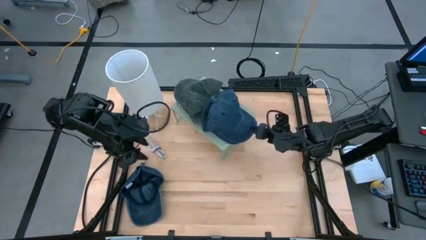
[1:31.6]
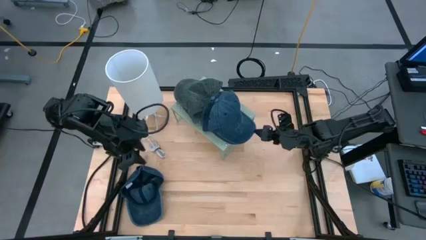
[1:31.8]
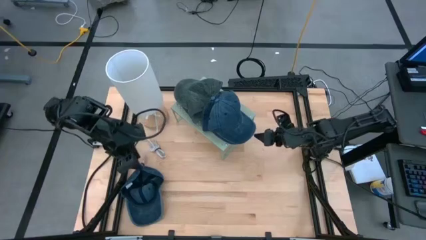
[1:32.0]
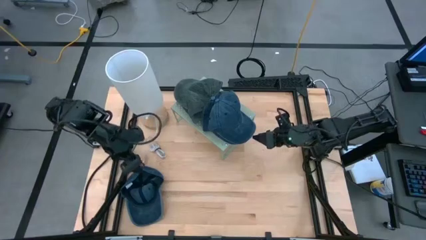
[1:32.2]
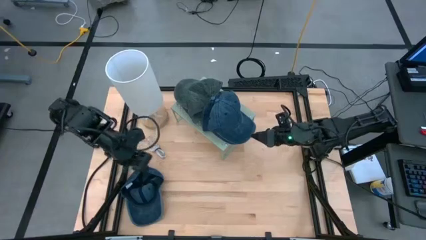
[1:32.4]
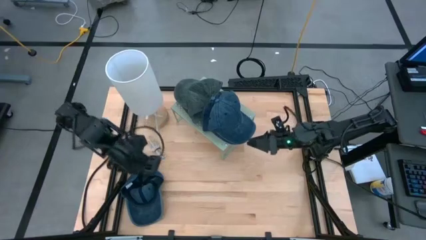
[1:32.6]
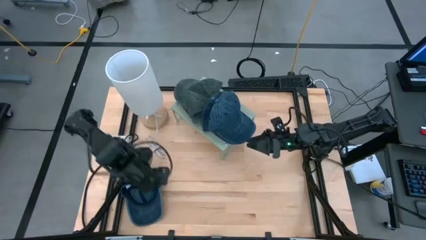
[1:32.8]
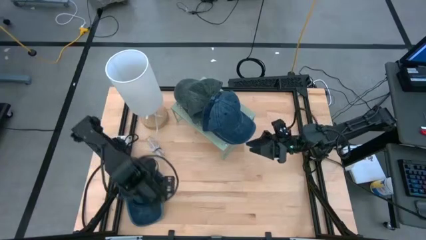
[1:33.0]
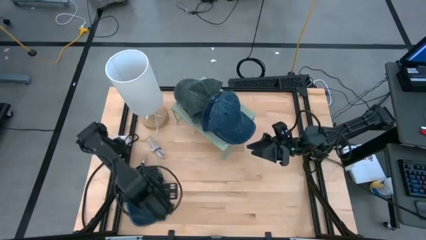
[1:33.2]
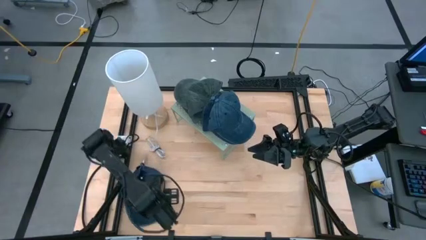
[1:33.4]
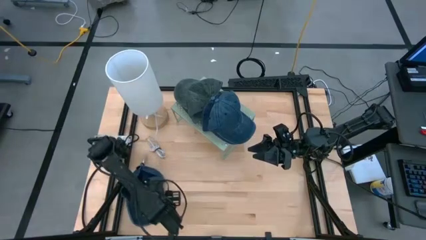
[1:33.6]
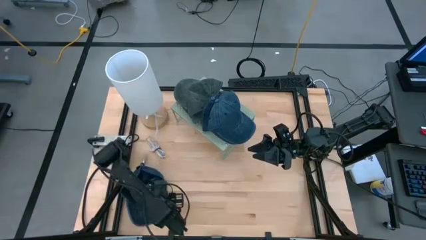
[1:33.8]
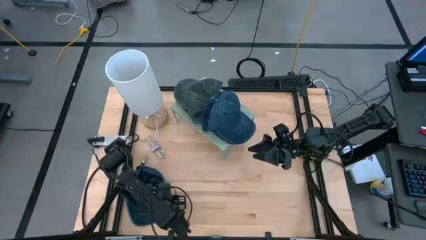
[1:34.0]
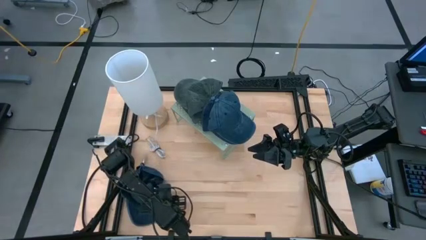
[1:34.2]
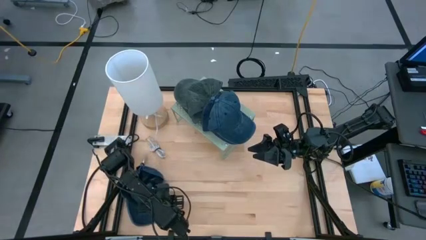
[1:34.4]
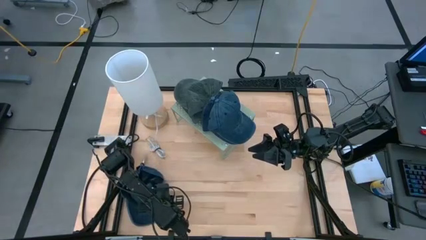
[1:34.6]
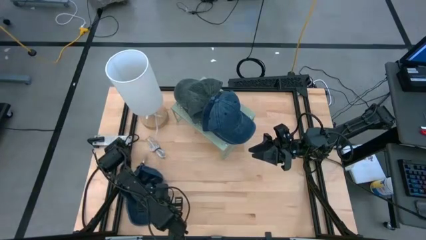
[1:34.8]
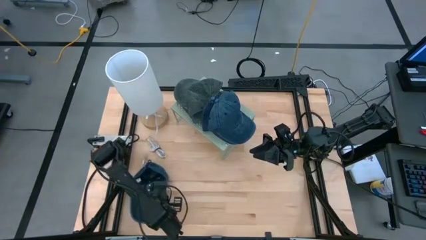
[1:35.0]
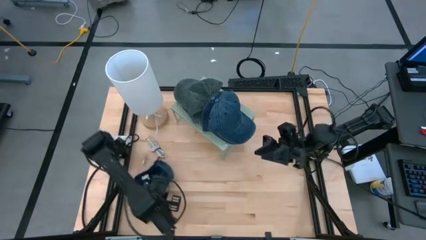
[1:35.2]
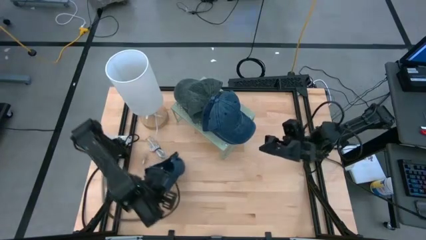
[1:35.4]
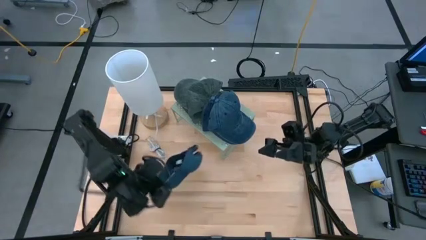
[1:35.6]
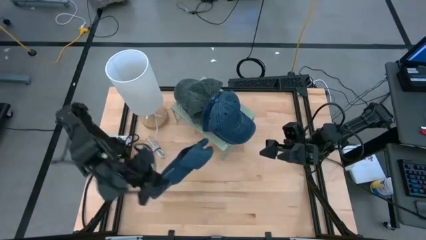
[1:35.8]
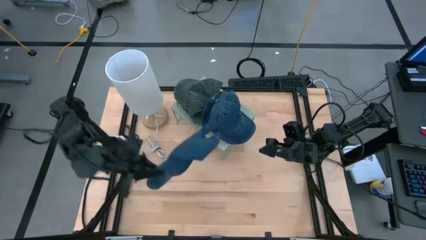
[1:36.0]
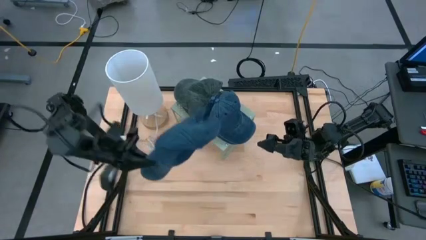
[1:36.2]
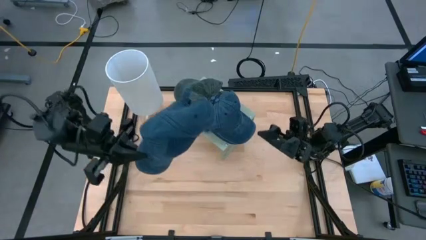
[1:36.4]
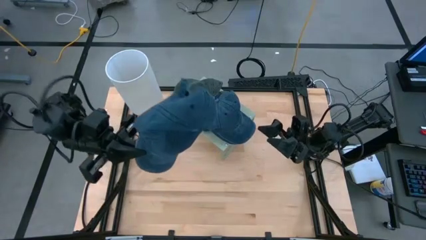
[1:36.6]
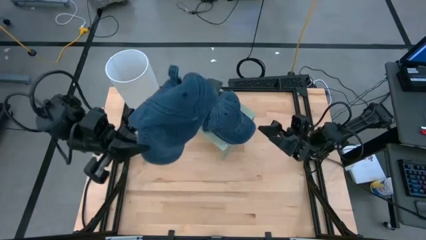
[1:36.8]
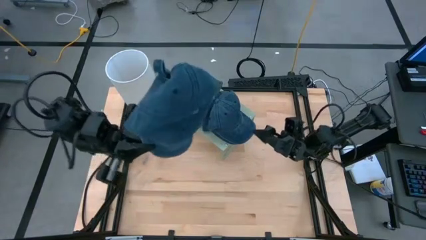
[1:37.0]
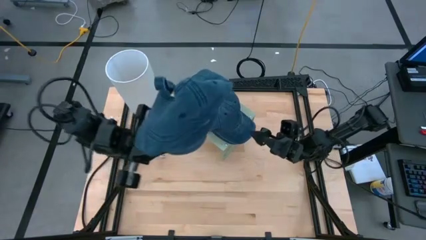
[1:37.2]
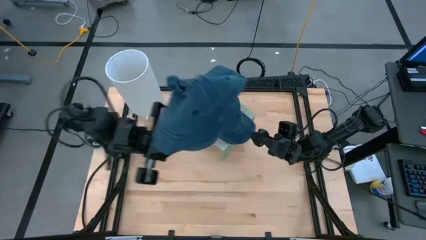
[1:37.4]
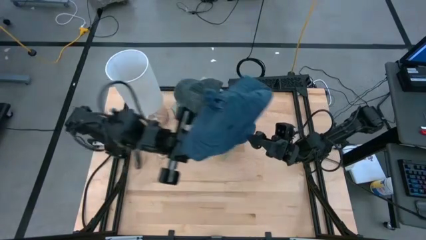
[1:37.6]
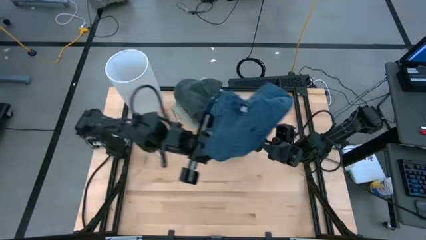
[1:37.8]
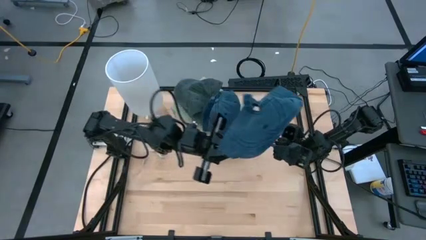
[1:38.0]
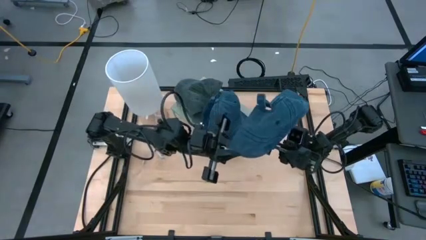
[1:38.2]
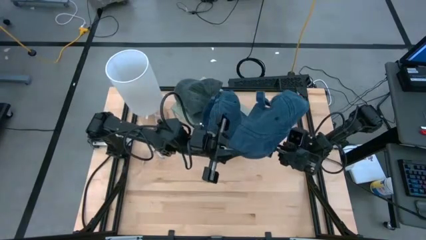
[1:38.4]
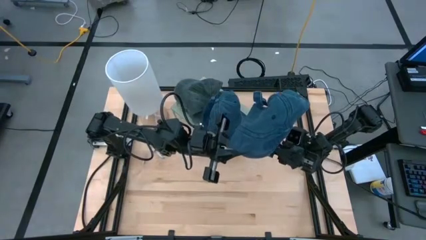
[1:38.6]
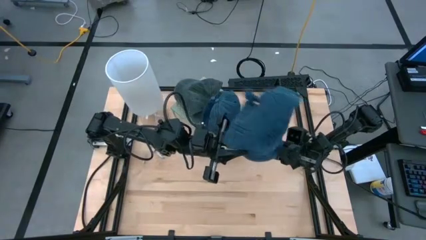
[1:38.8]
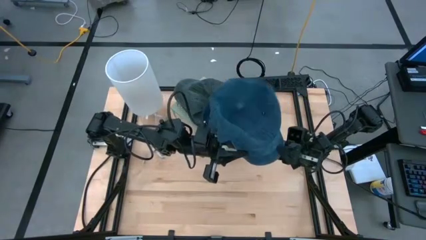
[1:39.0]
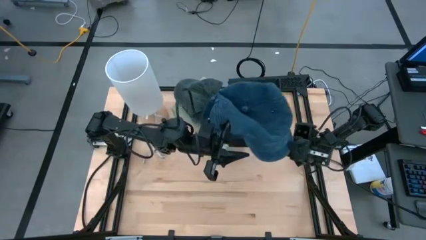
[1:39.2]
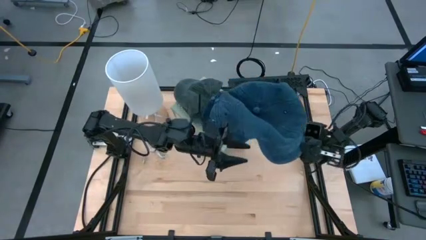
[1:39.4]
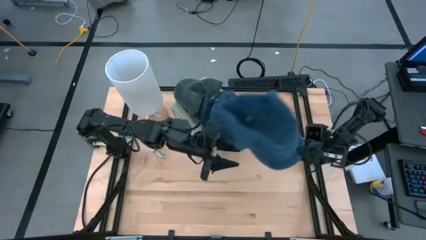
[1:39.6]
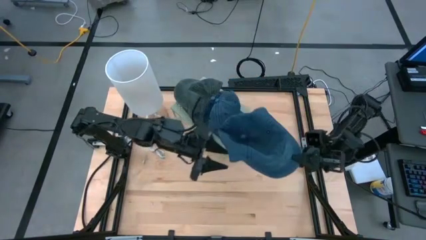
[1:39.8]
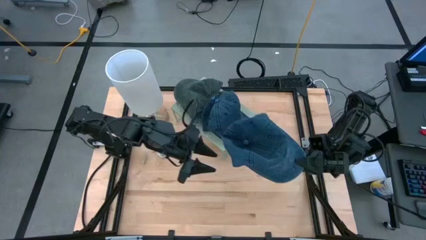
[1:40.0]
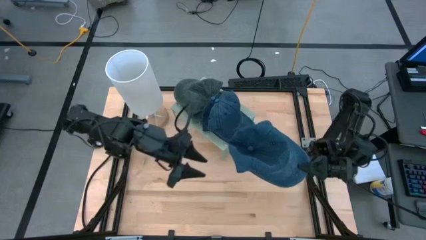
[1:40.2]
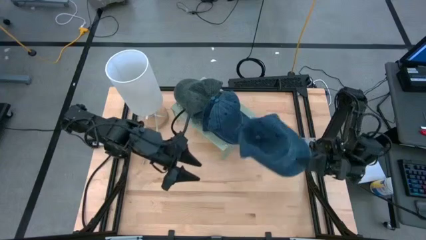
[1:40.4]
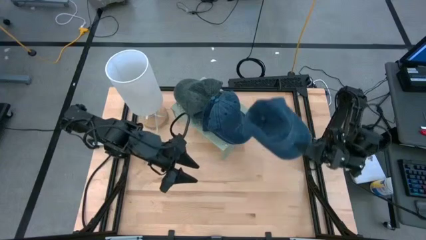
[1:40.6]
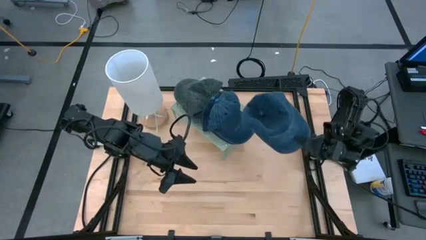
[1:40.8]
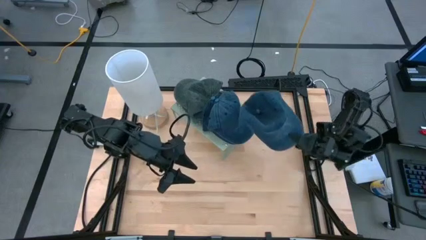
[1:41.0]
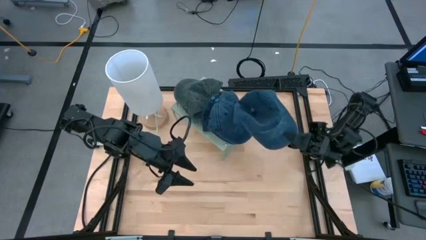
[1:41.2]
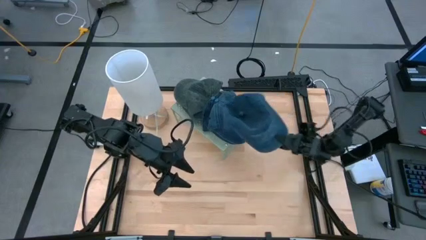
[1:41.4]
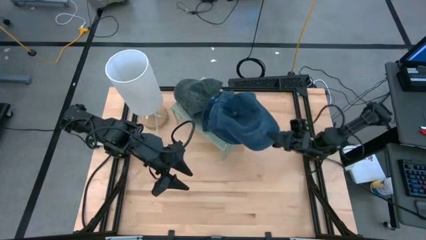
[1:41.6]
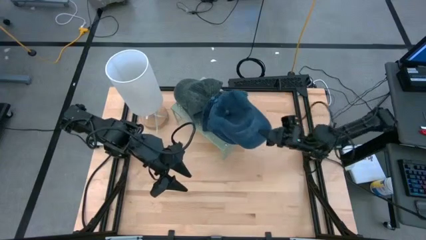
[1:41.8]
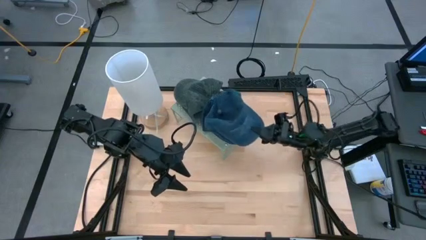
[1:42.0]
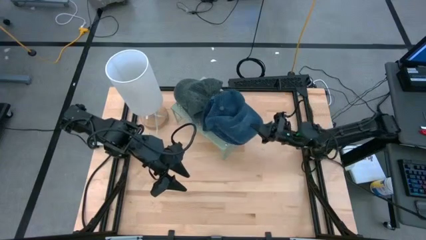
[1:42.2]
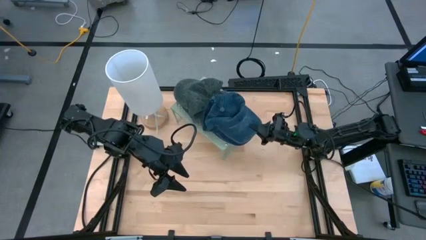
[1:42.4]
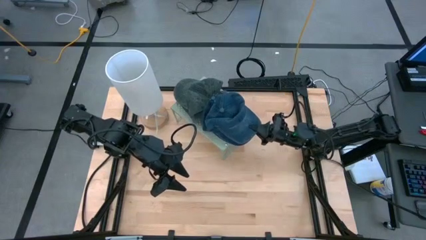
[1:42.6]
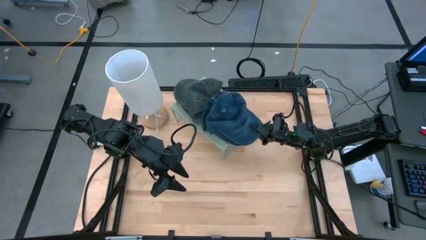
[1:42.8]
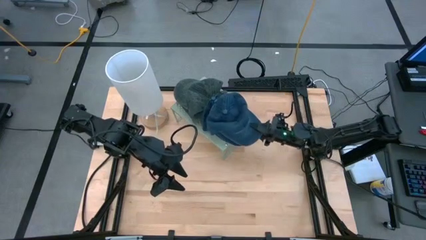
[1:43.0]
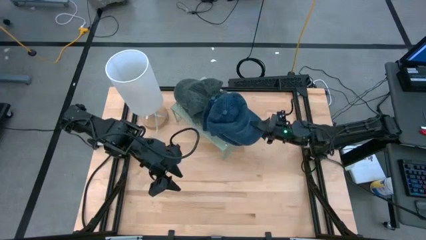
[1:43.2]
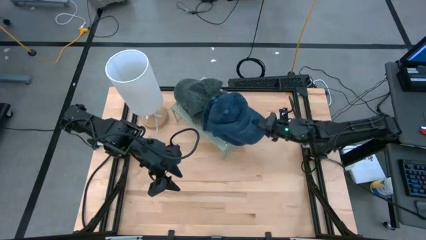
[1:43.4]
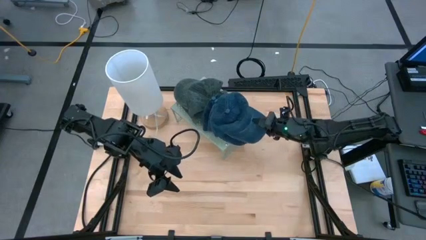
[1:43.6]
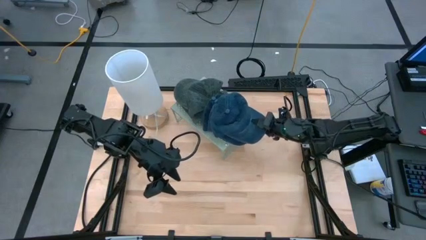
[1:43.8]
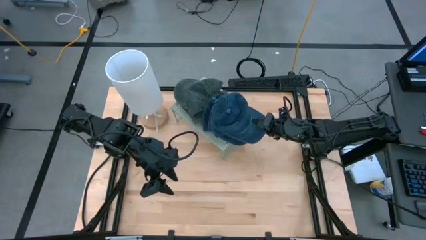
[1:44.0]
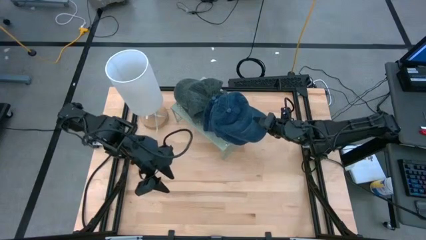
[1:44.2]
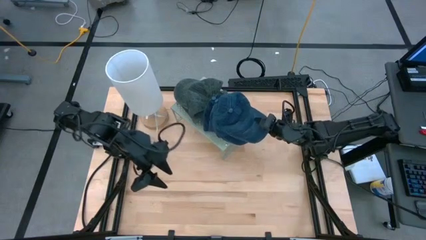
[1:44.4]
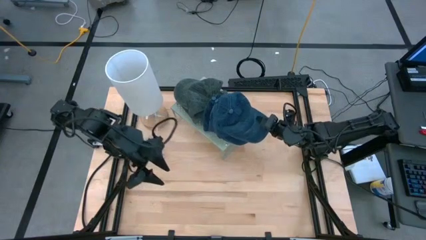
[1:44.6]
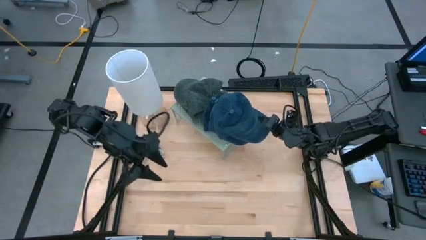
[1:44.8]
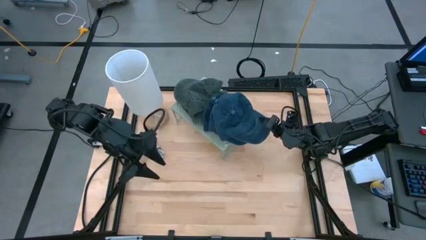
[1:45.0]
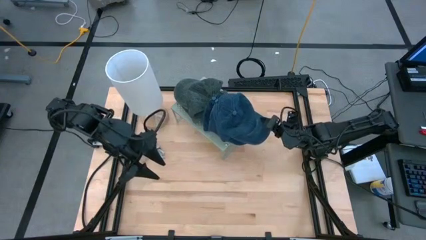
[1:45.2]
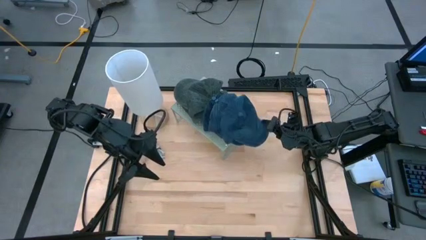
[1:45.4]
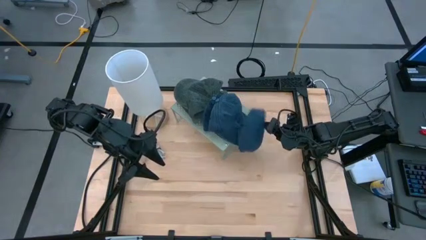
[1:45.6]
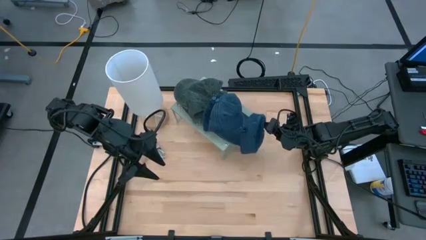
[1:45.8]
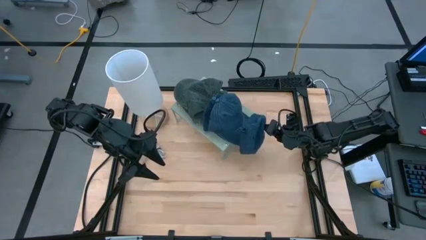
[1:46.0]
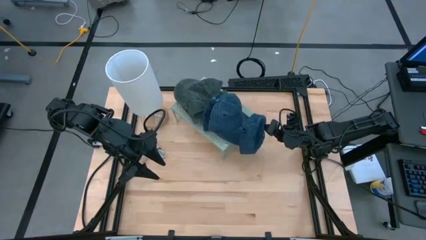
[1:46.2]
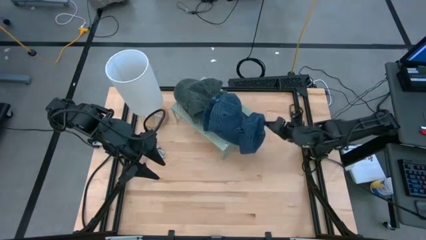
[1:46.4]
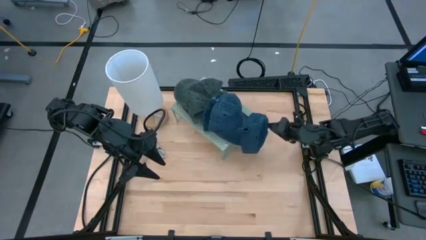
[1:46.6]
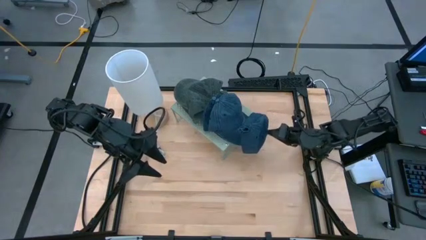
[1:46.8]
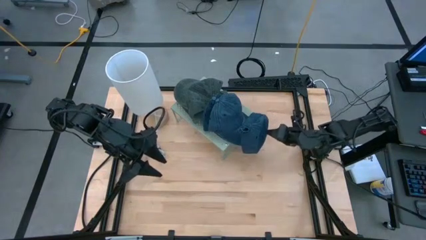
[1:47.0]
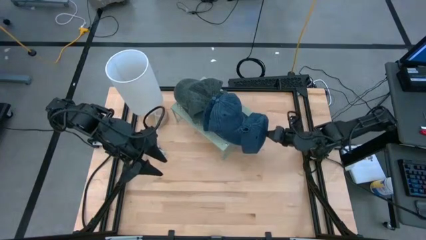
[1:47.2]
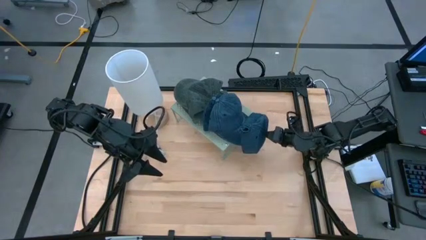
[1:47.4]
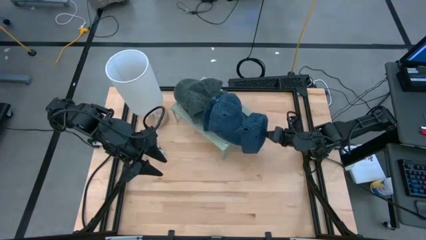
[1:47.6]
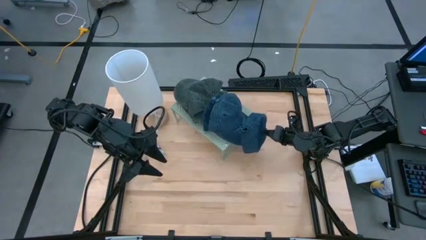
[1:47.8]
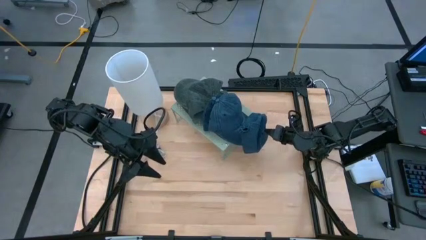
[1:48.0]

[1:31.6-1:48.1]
Task: Pick & Place hat
Stack the blue cap on top of the stacked blue caps on the shelf

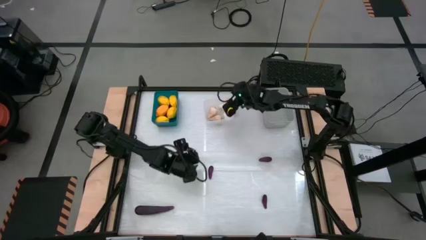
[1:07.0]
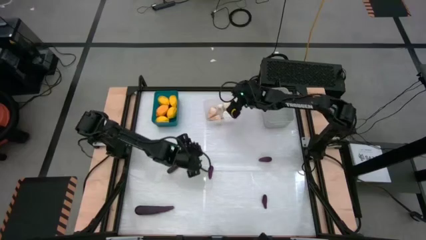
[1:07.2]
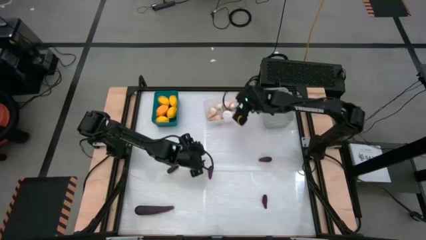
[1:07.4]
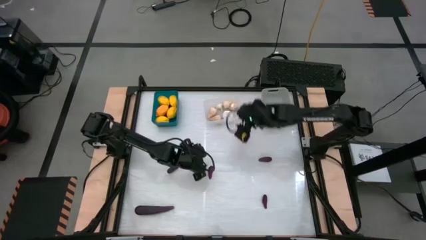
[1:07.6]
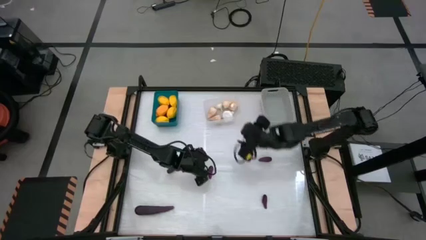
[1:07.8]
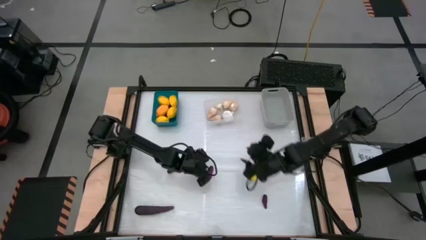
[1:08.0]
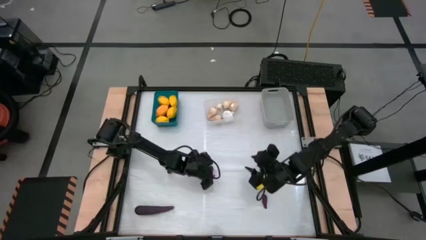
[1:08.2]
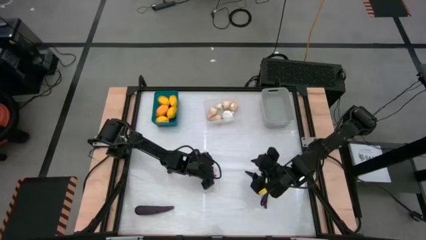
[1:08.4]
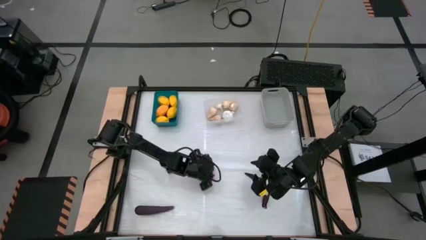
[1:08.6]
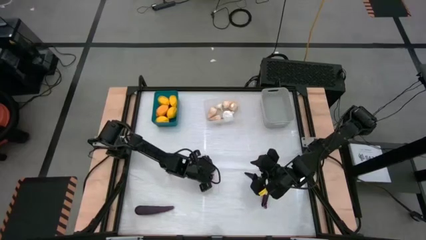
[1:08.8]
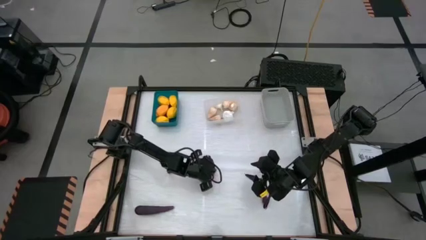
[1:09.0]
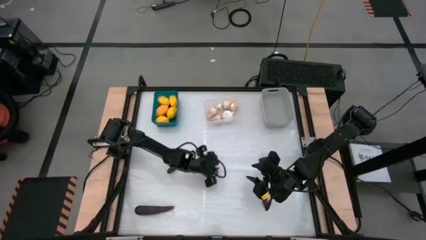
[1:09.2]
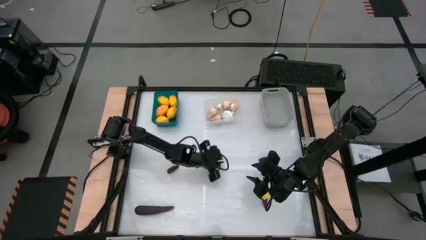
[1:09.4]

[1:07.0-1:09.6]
Task: Sort produce into baskets
Put the eggplant into the gray bin
